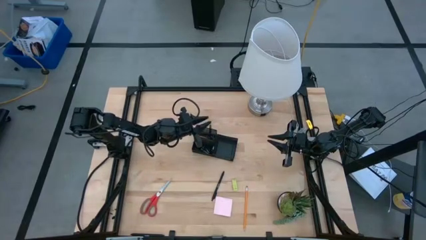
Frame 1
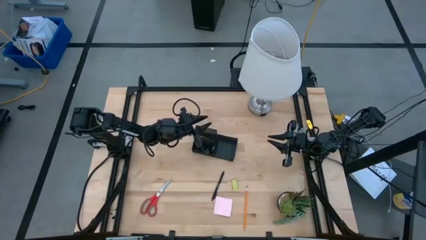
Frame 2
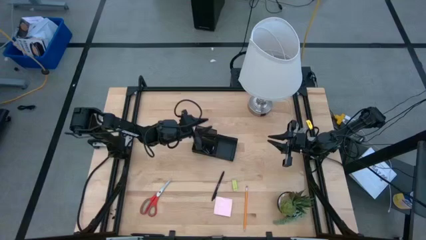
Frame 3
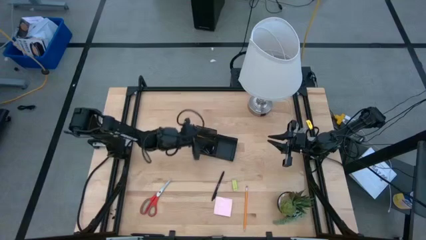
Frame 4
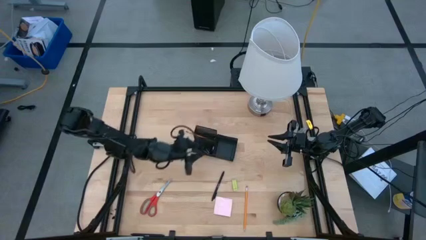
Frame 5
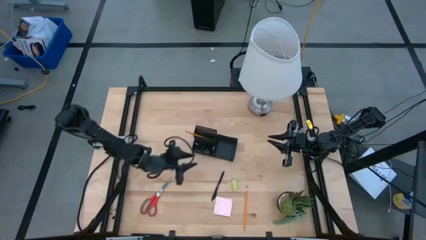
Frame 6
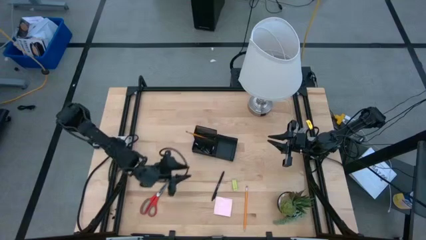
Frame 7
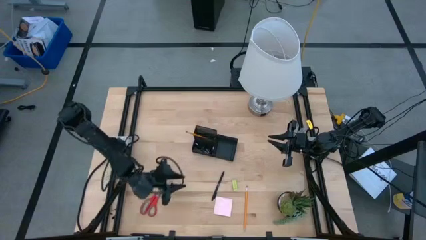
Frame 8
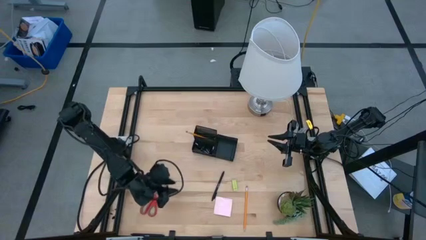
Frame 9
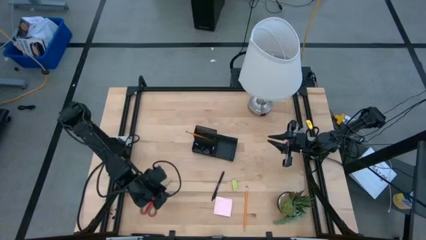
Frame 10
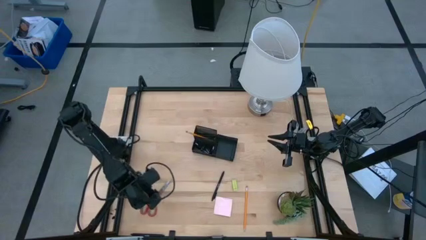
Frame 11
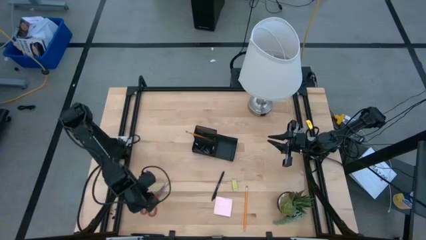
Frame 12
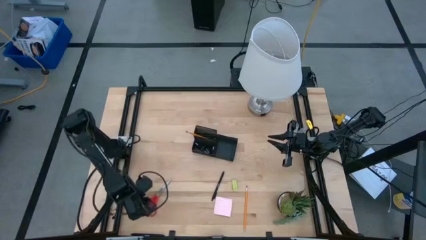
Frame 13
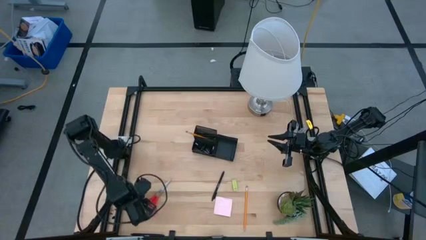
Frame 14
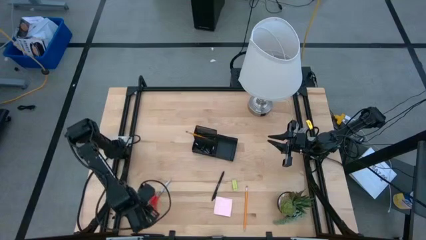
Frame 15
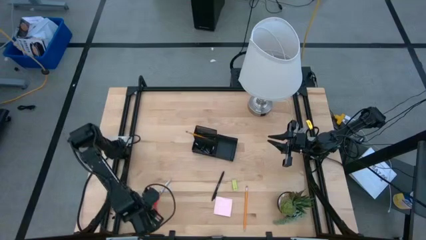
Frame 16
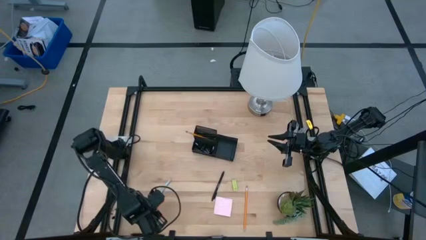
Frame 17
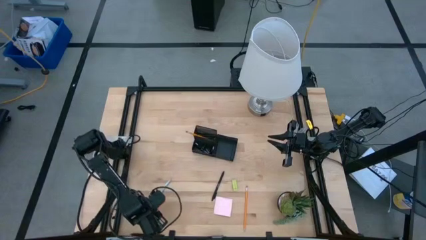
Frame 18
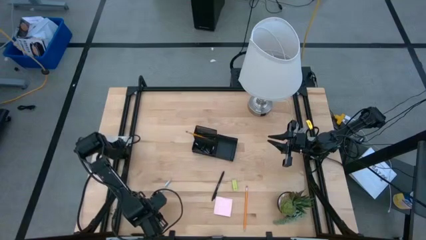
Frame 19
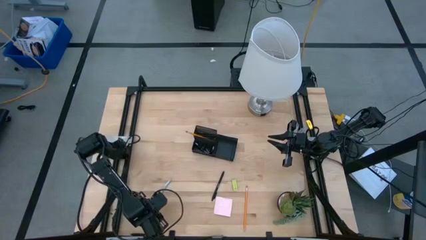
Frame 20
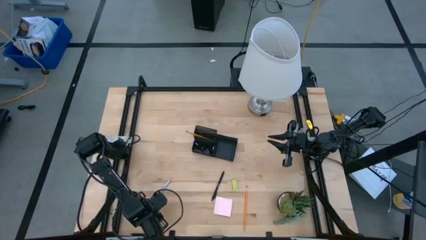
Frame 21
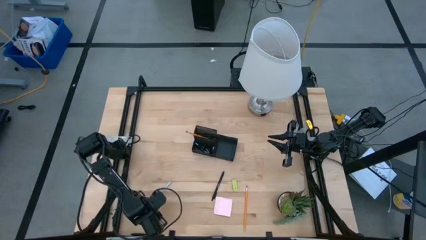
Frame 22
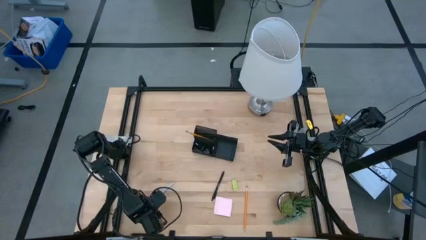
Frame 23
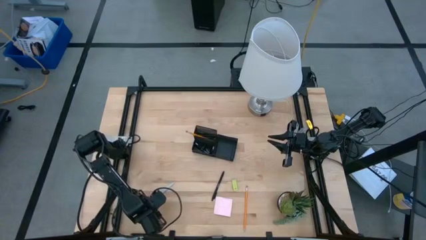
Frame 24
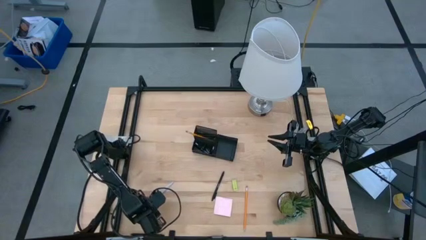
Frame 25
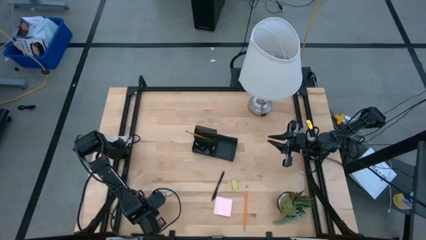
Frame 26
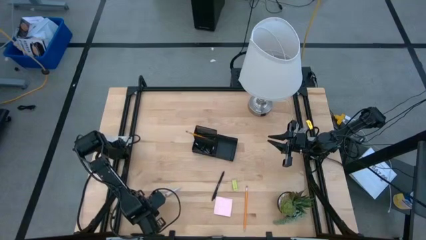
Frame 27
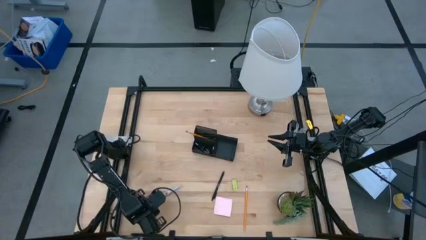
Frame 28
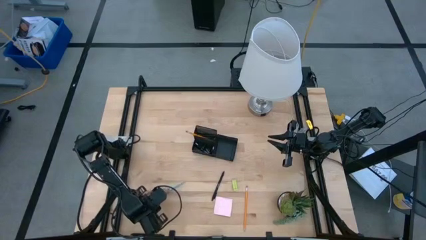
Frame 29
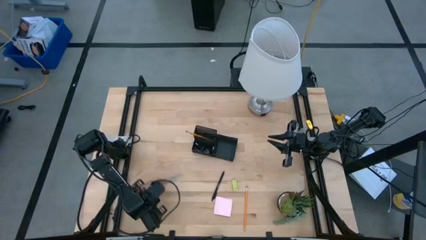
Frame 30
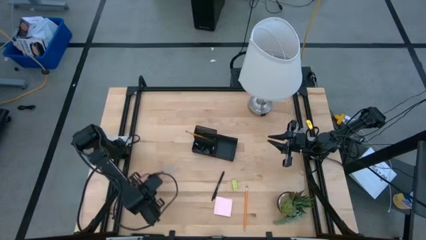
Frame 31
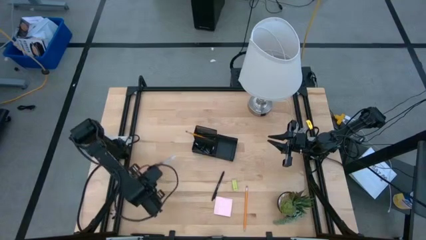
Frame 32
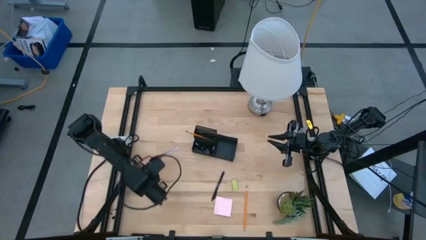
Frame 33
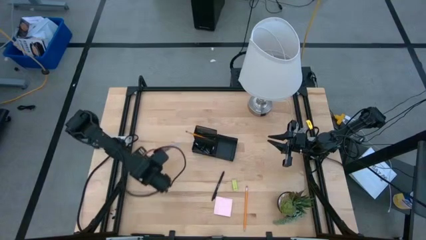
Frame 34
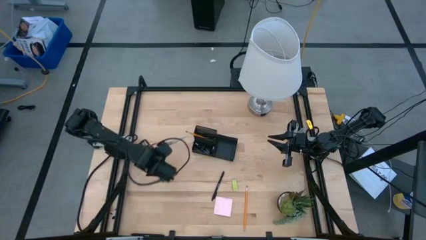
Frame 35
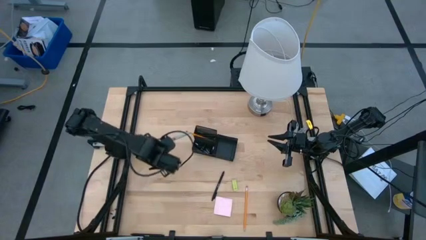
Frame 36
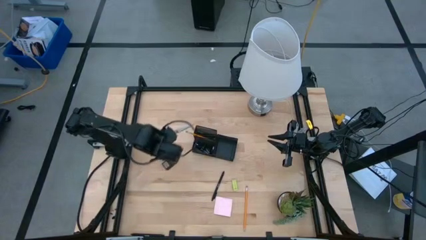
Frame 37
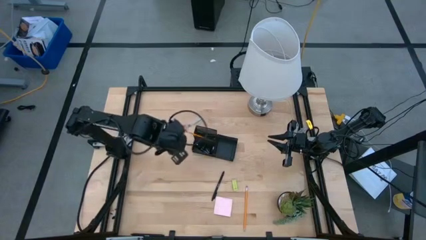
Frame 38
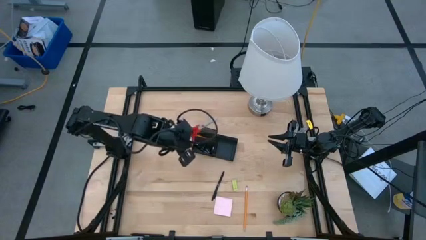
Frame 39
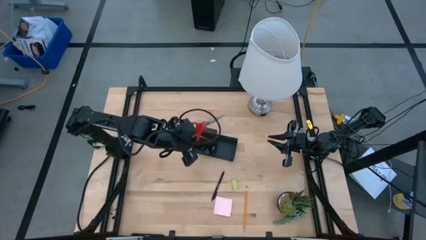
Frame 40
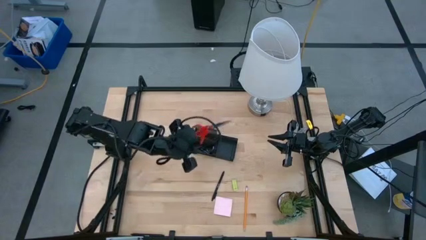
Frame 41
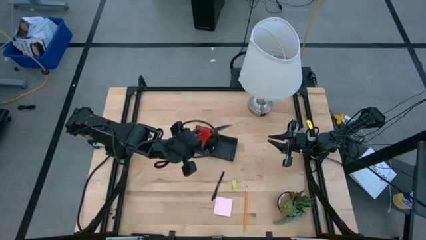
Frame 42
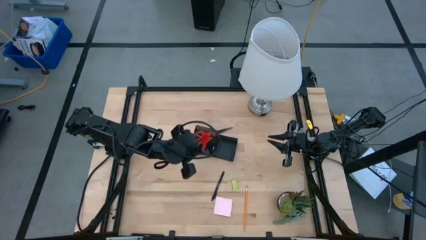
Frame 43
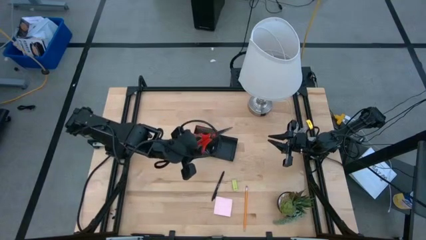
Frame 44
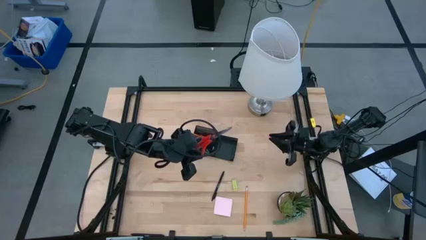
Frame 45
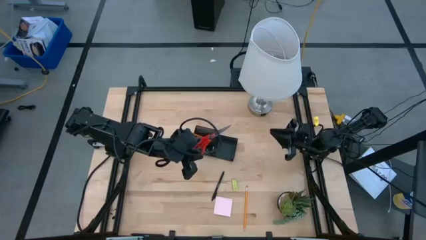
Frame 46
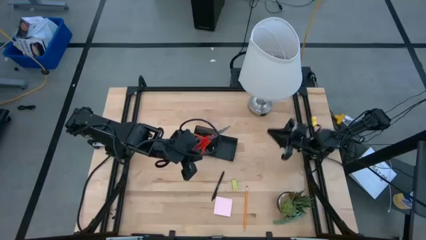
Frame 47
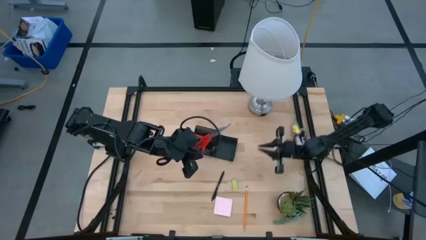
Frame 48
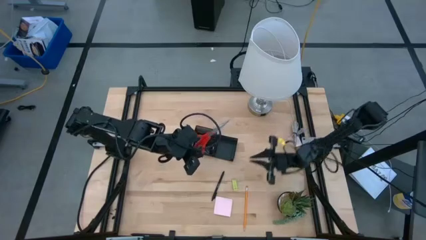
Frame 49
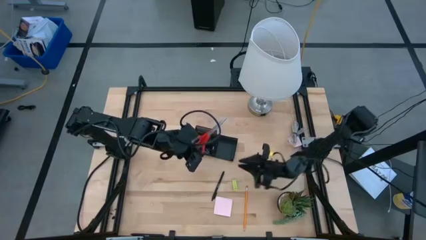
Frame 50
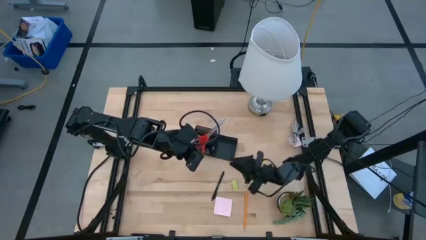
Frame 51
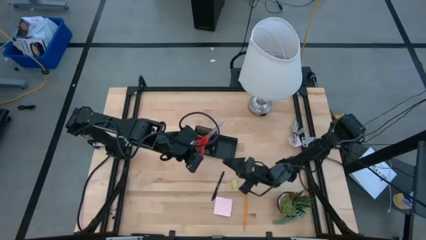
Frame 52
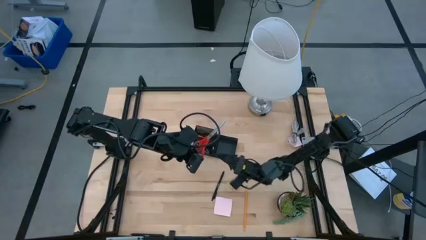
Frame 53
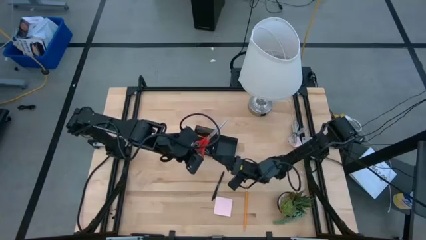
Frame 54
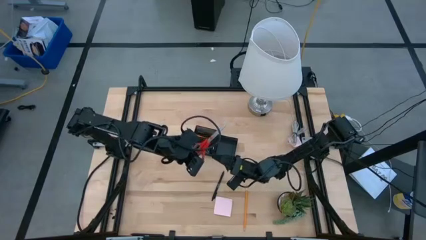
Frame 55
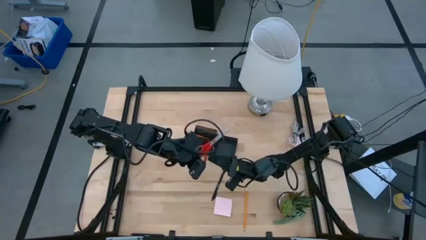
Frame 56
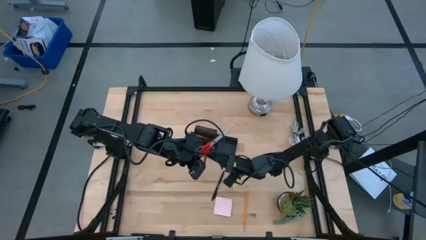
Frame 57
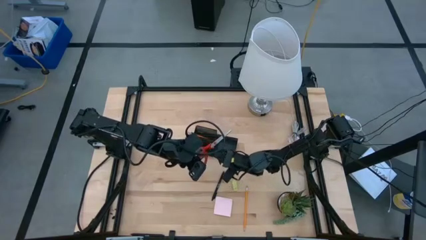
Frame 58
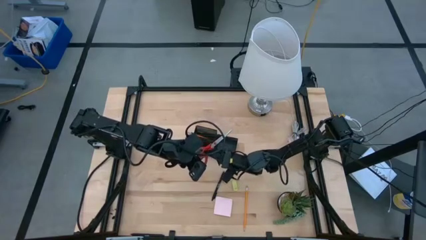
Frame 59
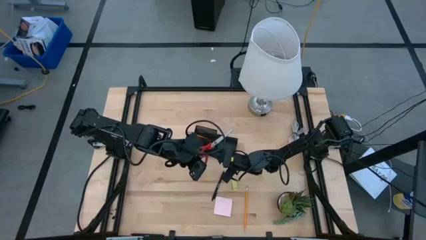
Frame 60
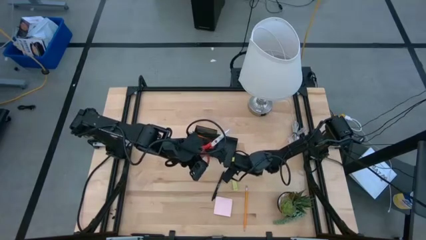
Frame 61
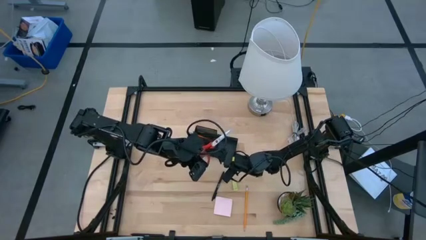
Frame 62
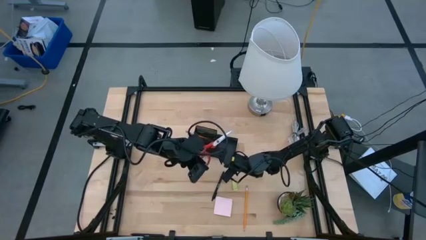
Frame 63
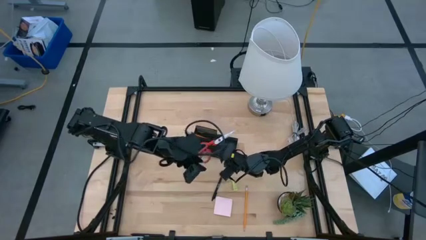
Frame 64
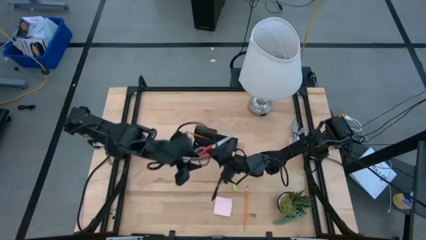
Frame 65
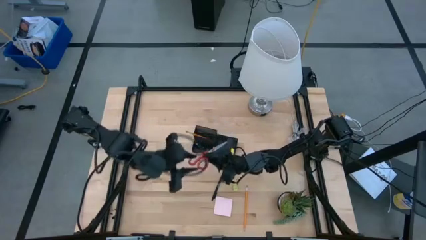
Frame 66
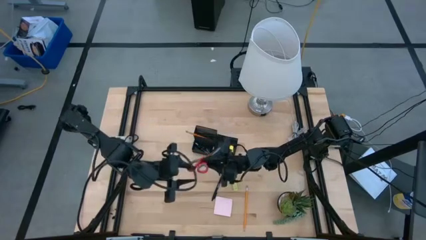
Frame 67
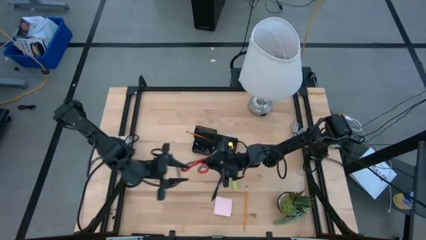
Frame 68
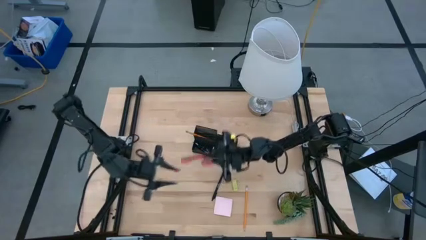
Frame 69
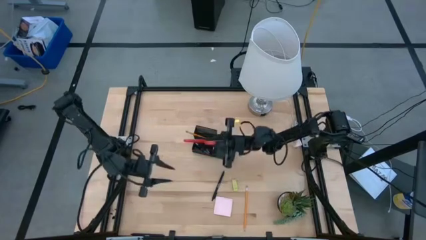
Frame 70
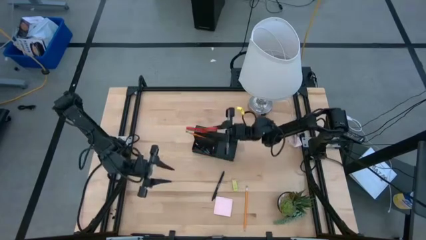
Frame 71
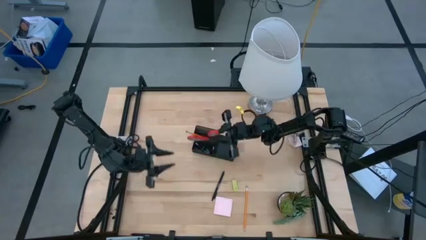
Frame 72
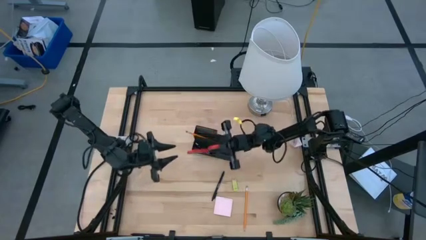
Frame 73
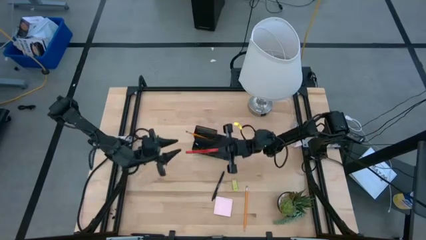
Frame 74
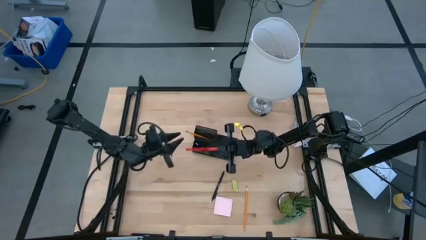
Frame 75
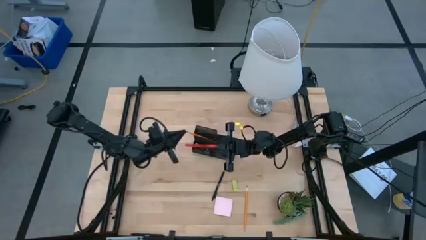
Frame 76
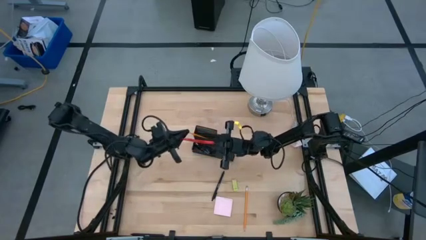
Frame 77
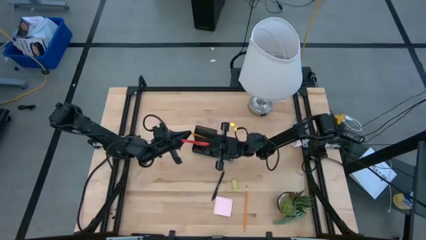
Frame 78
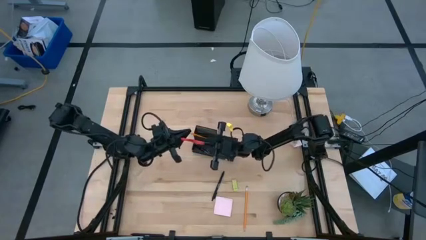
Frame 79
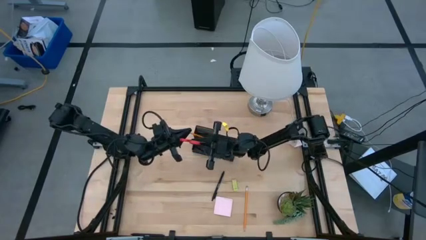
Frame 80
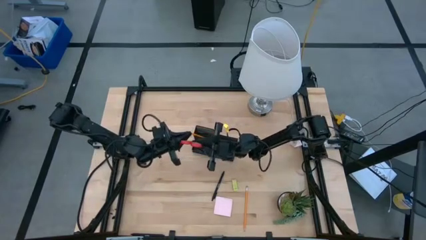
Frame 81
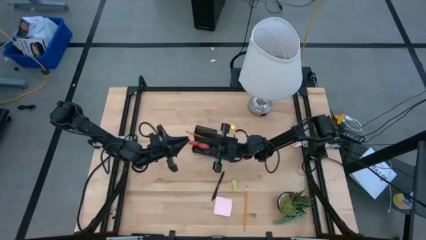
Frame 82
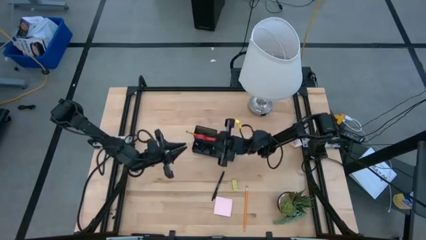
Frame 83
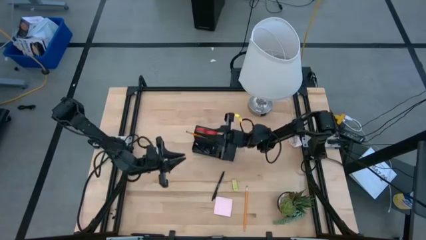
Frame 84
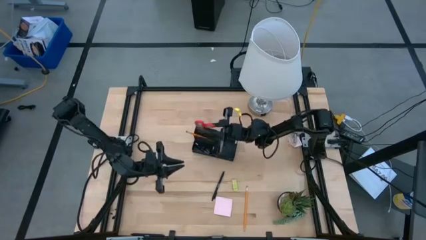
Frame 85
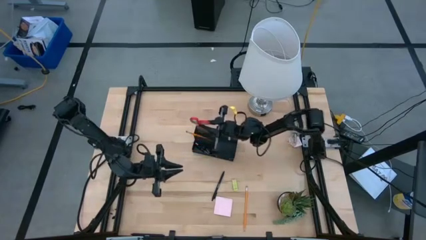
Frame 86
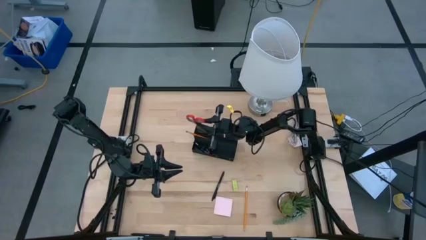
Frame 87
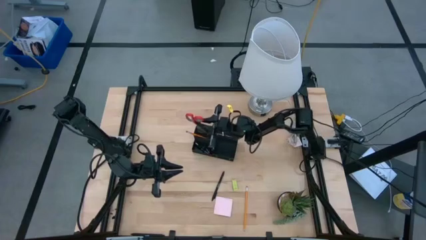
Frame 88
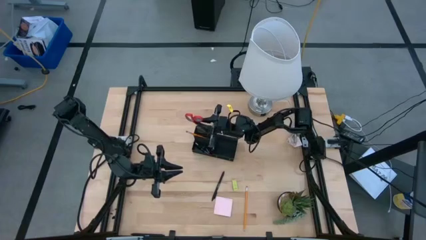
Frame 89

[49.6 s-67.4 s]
Task: Pick and place office supplies into organizer
Put the red scissors into the black desk organizer
